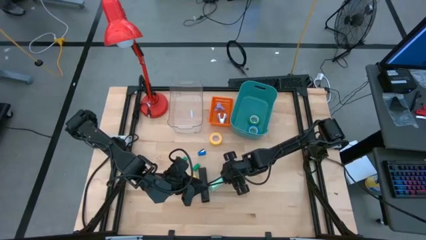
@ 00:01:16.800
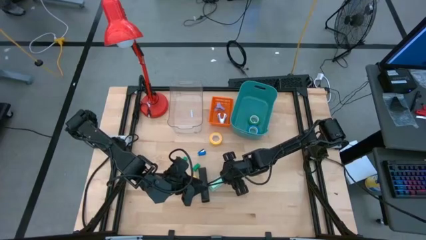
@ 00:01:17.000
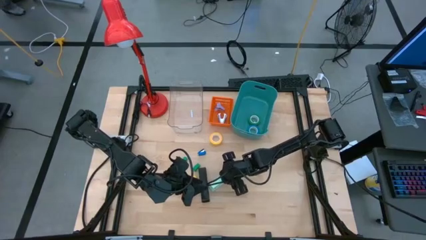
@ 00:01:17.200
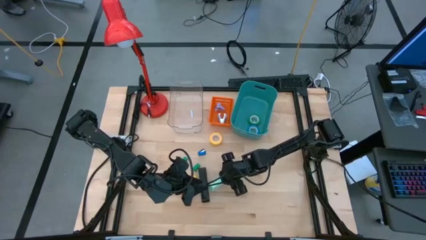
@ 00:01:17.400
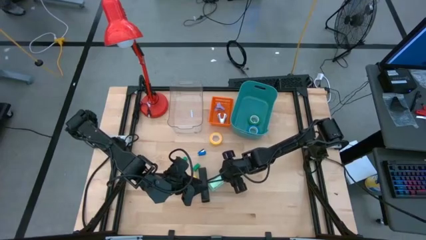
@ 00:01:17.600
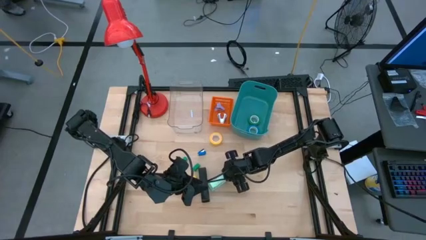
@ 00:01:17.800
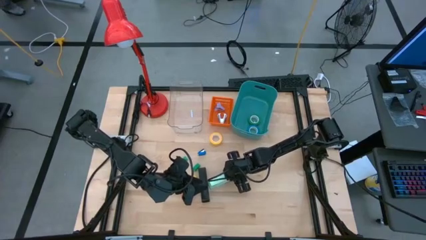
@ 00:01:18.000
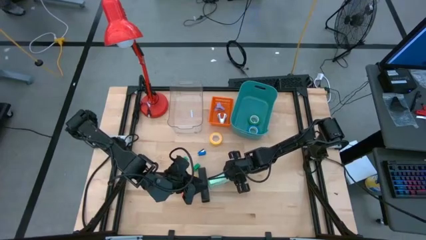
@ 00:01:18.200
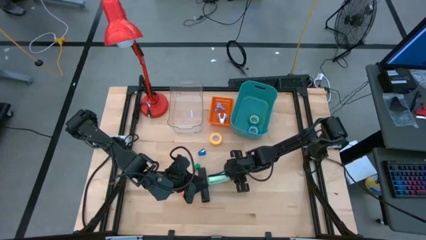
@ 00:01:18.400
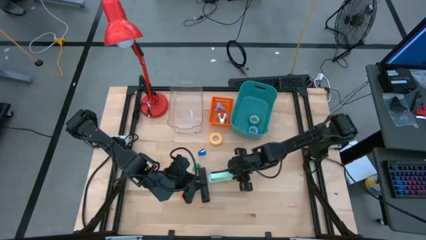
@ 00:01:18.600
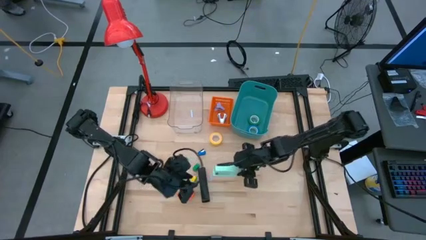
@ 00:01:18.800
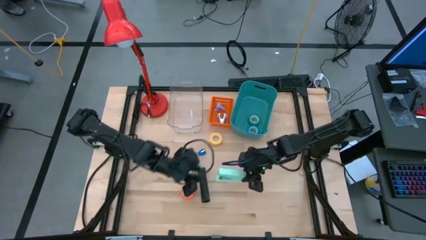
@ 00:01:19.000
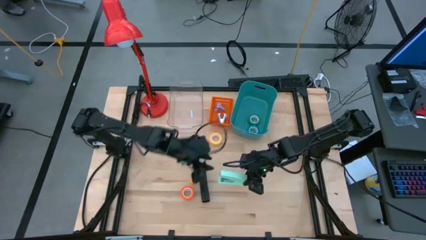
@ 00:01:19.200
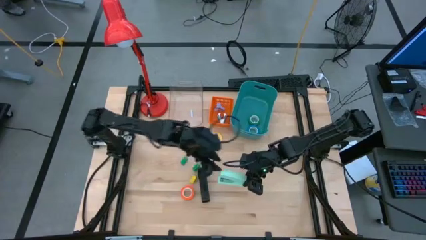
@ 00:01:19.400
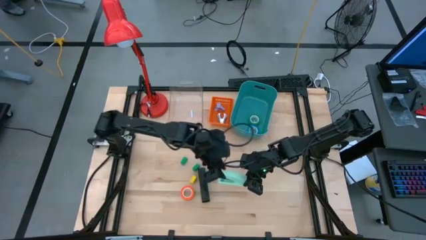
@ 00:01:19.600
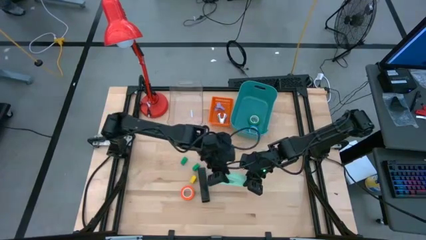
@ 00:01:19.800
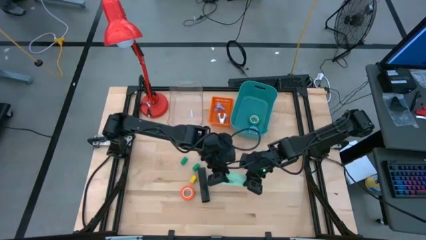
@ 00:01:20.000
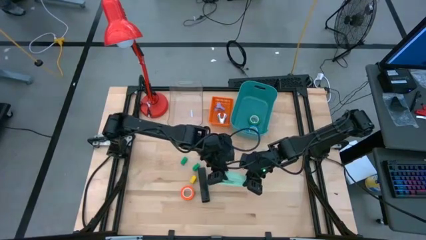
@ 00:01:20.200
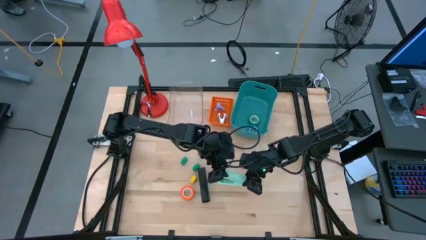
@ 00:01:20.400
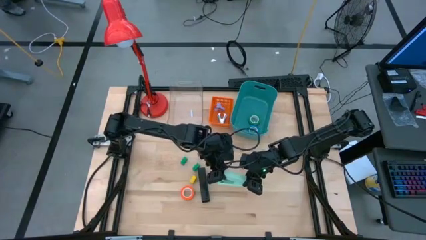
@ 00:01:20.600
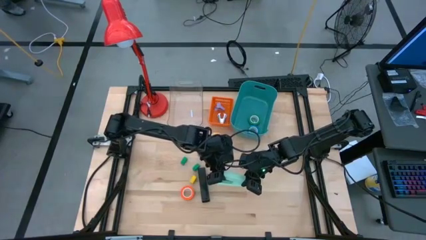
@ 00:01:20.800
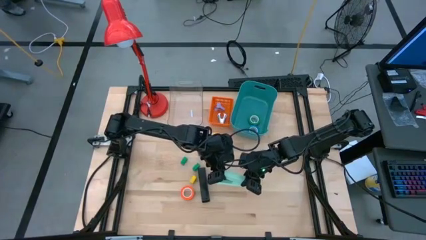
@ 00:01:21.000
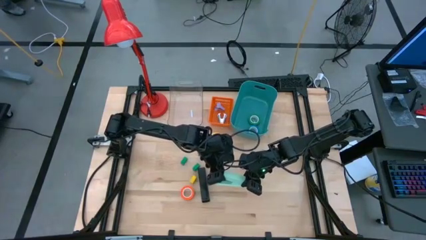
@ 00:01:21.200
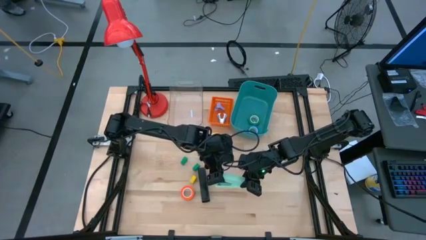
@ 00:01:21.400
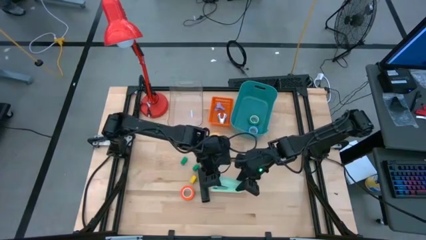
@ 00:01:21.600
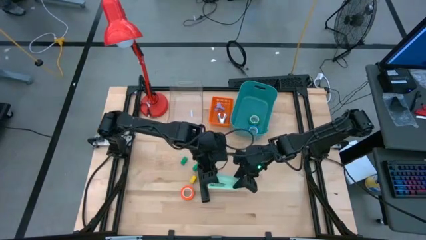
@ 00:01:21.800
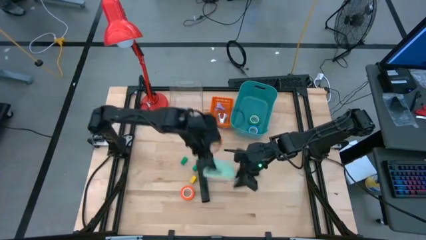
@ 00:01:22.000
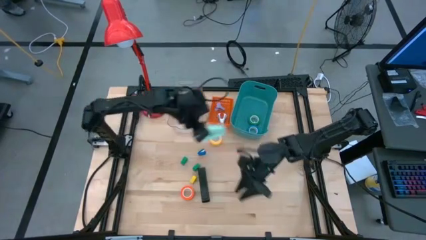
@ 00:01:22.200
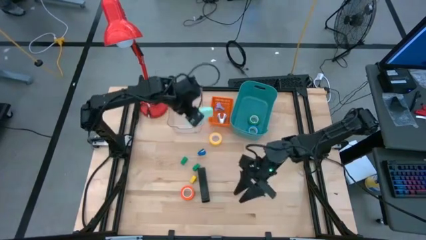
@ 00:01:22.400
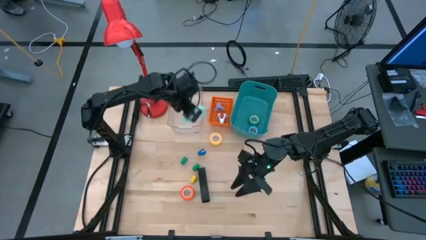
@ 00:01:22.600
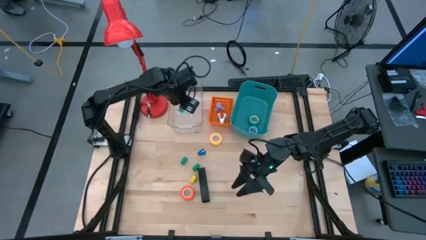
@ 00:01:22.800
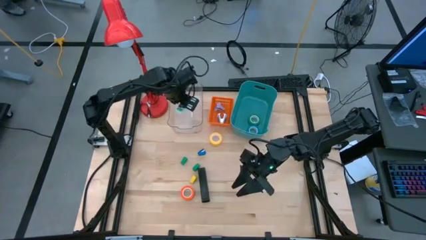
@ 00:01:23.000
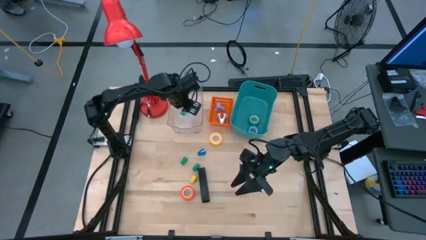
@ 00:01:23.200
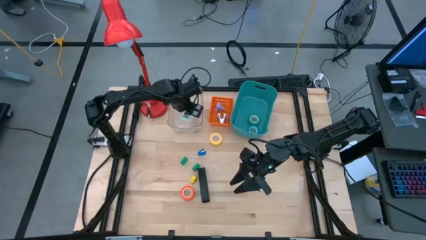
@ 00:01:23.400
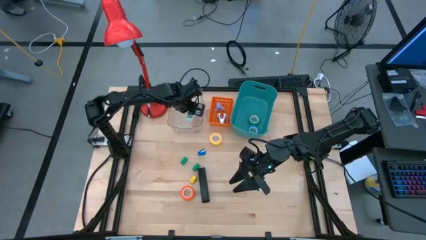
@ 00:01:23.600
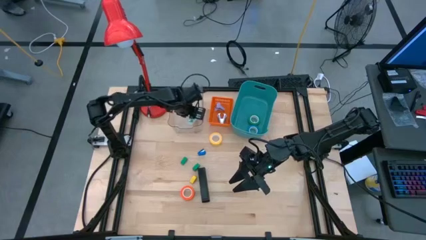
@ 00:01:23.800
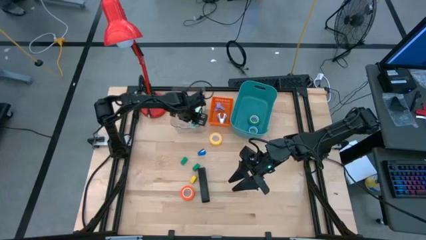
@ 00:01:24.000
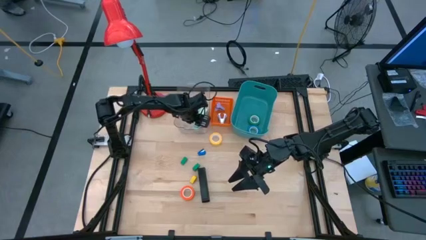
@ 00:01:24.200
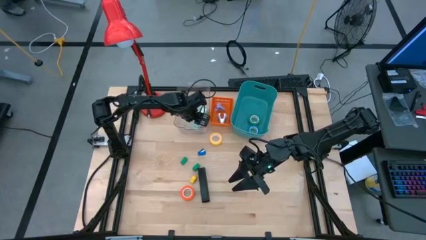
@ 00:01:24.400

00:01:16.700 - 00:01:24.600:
Task: Pick and place Stapler, Stapler remover, tape
Put the light blue stapler into the transparent bin

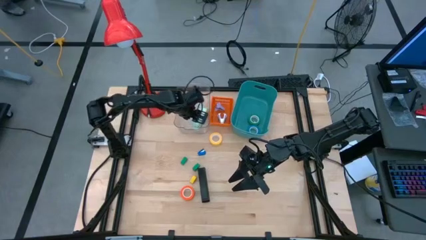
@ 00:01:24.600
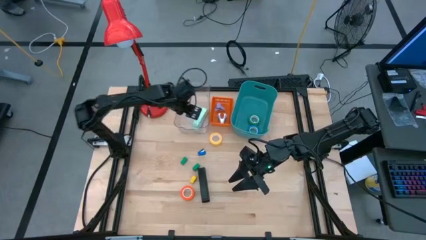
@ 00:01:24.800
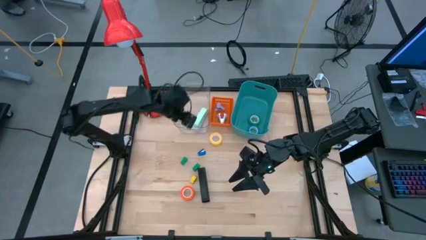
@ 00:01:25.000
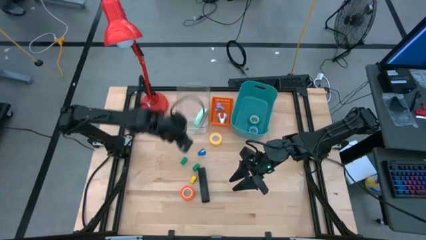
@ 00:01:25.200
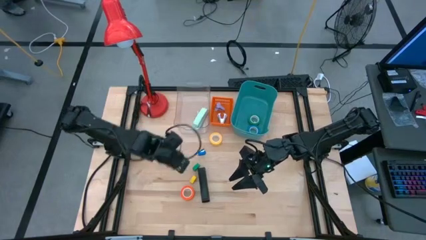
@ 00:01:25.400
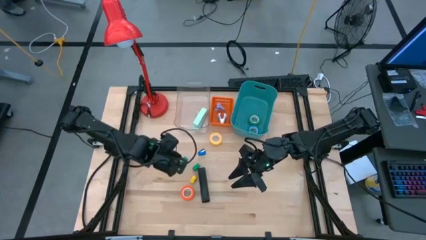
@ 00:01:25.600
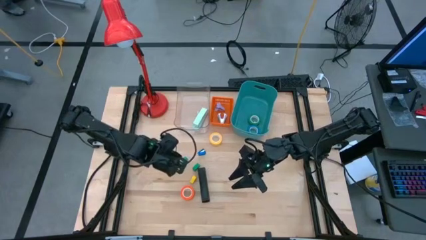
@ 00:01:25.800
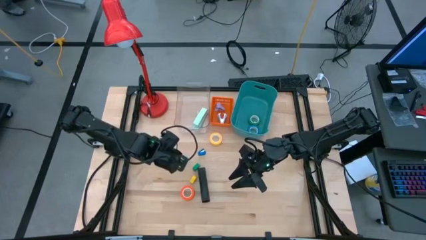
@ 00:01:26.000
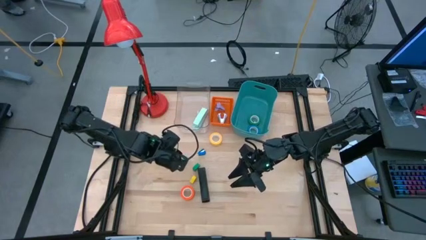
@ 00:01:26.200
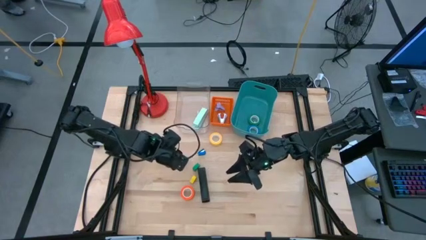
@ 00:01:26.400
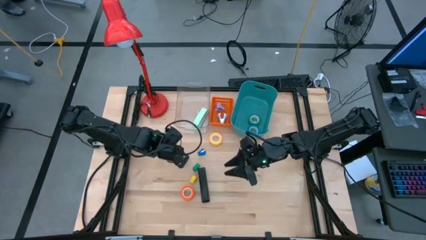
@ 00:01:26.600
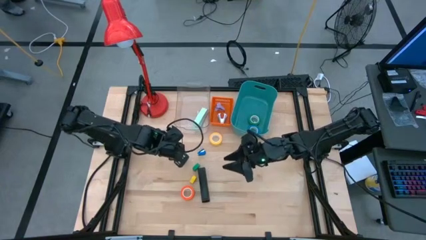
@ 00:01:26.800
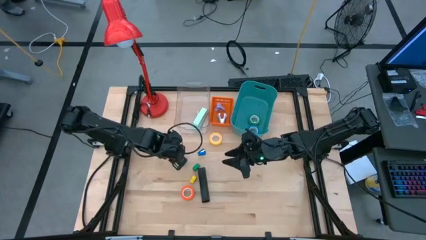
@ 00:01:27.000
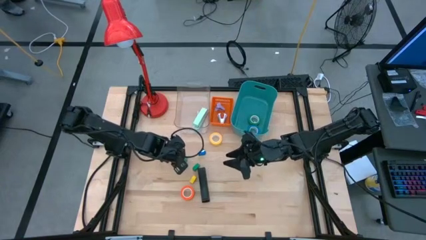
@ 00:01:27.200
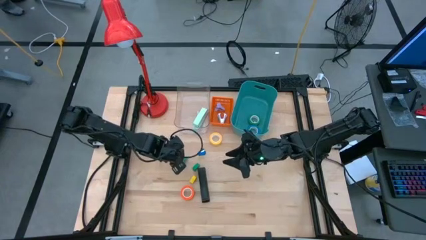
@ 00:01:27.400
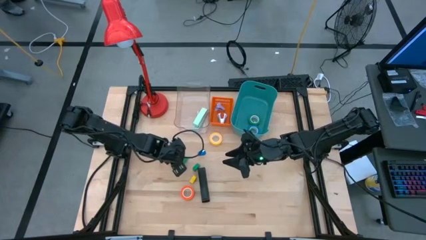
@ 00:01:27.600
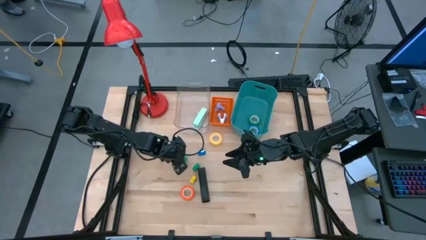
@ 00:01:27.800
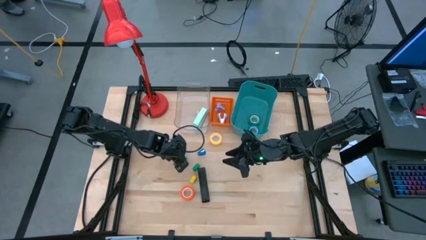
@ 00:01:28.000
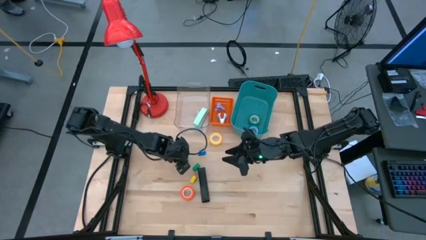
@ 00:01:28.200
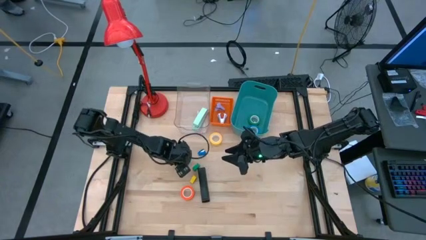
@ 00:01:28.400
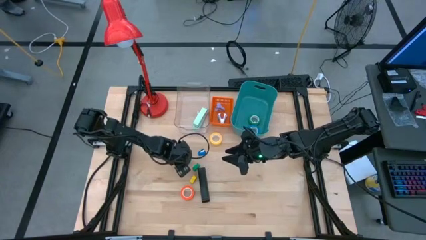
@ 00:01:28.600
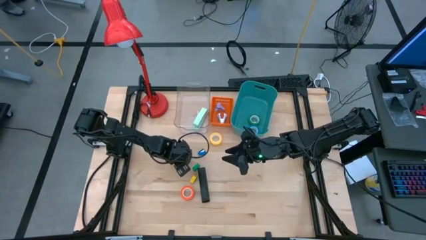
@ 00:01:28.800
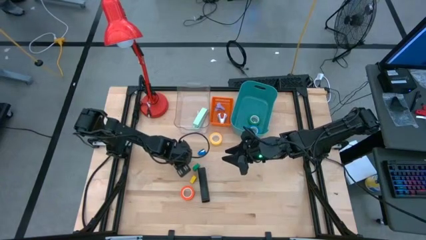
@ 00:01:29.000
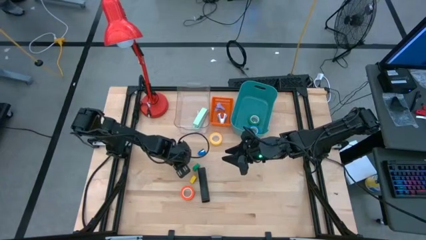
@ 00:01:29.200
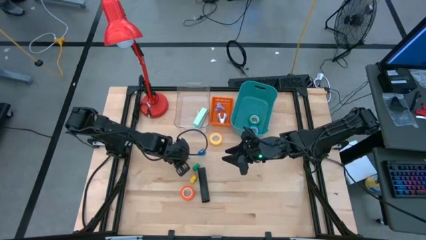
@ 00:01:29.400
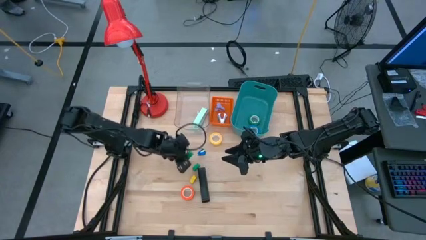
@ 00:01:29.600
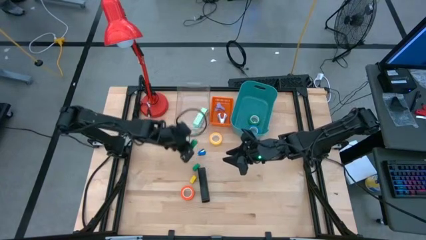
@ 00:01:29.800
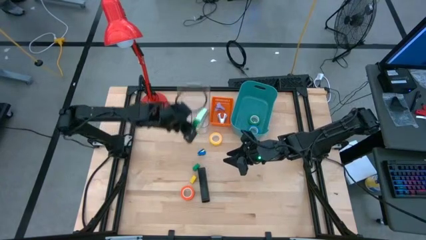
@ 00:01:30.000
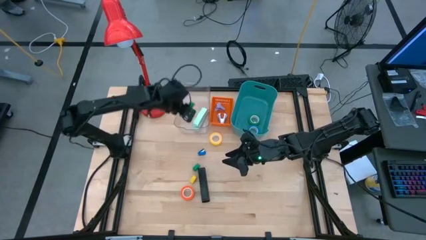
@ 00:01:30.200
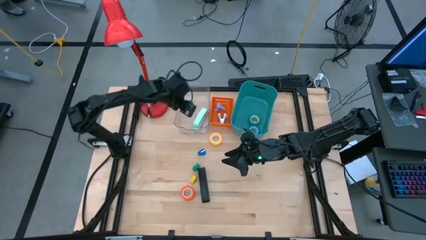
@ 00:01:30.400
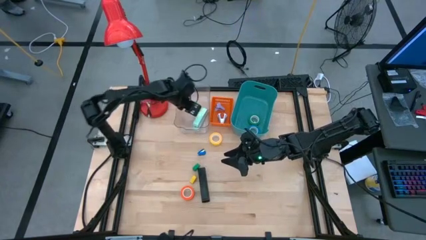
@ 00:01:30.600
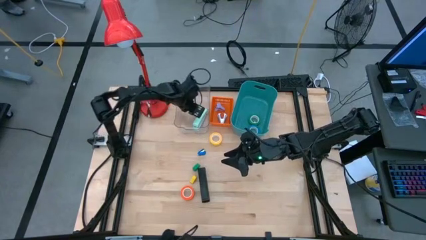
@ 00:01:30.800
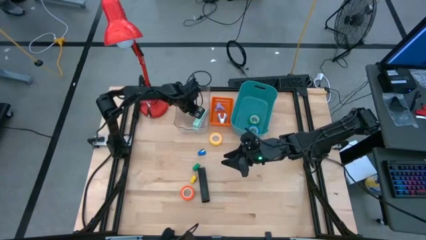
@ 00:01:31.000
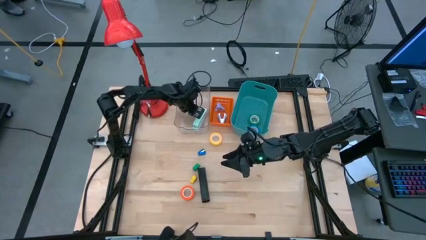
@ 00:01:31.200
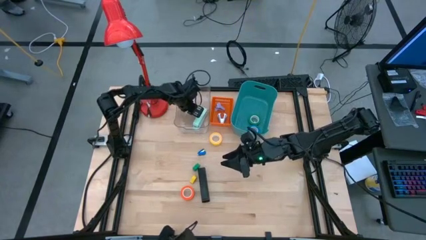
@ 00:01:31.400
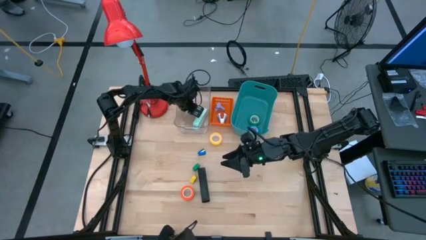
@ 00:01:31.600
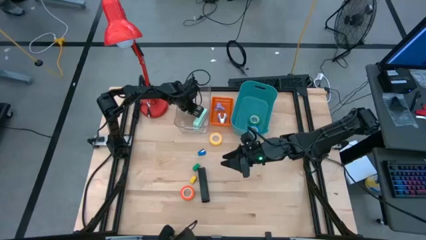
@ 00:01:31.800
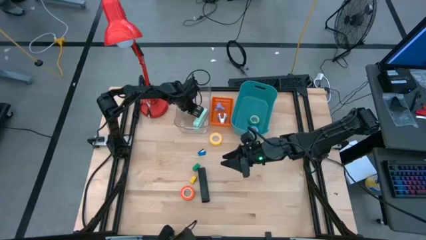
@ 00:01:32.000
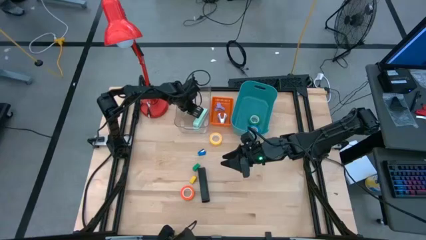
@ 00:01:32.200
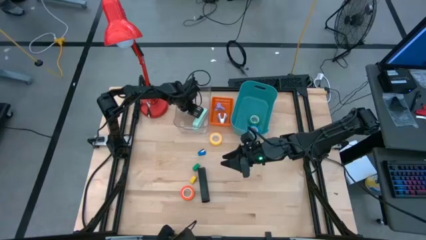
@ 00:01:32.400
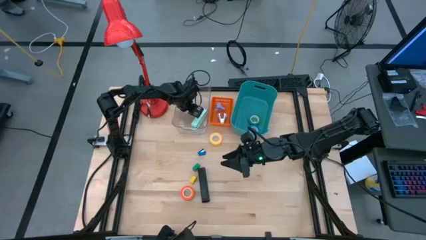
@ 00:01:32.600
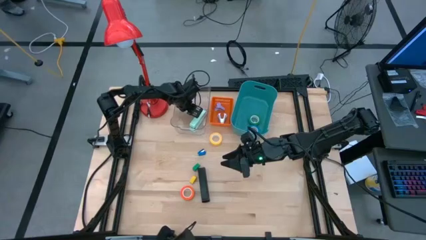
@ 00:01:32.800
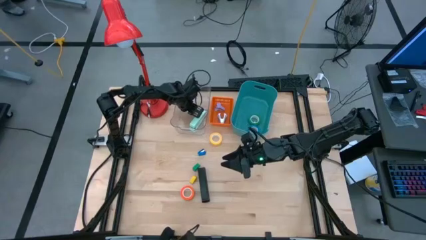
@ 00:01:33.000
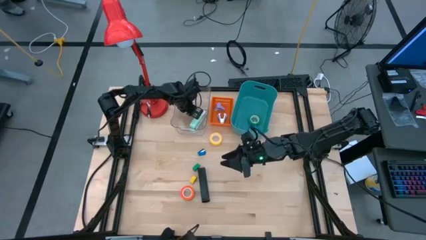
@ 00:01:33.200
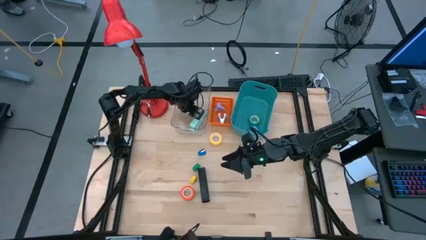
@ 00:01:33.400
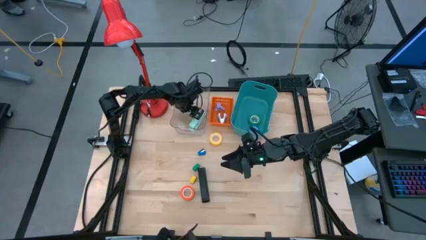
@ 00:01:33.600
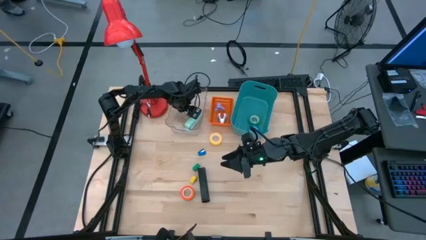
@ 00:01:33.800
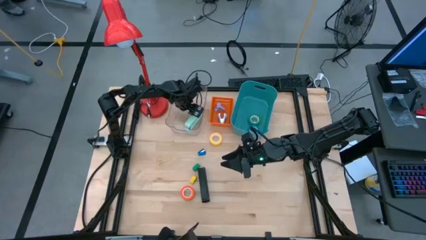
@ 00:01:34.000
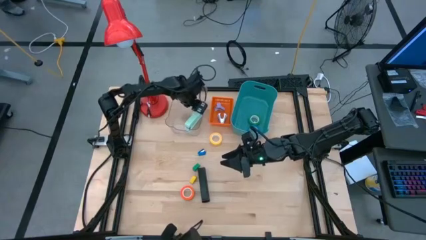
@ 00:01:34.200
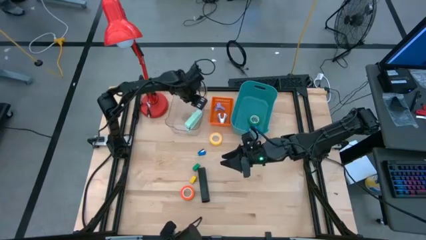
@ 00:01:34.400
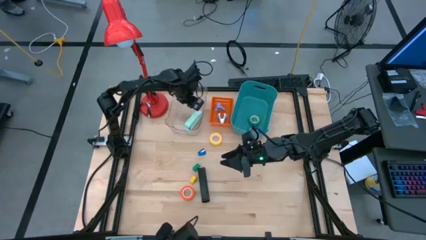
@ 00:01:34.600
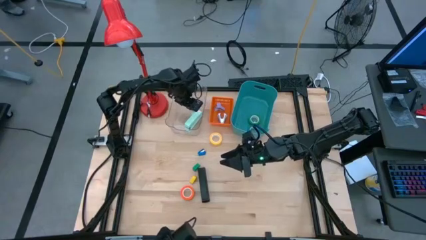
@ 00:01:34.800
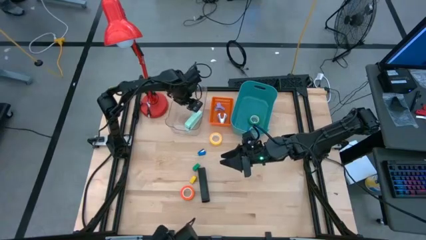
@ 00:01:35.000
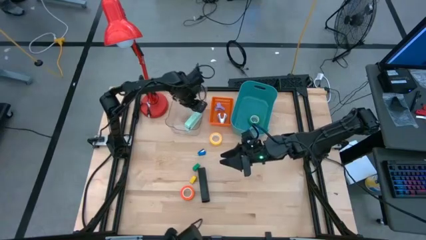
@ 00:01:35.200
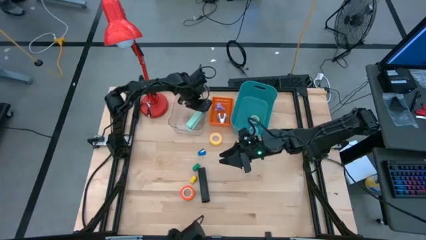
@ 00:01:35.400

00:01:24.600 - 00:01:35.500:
Put the left green stapler into the transparent bin
